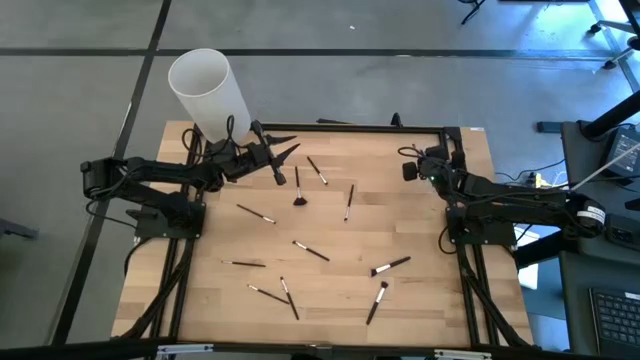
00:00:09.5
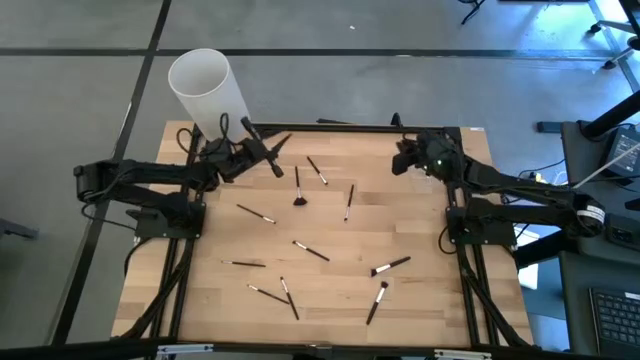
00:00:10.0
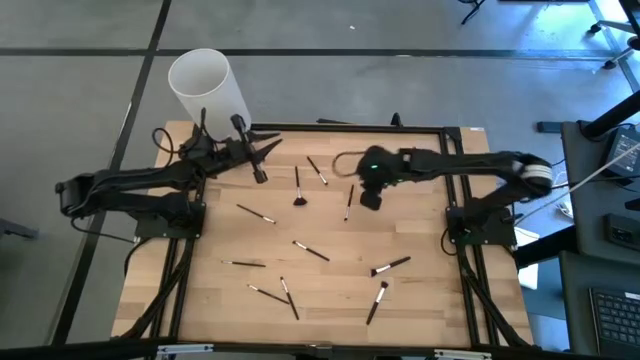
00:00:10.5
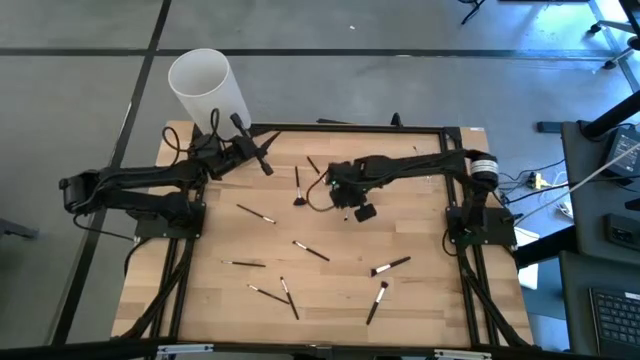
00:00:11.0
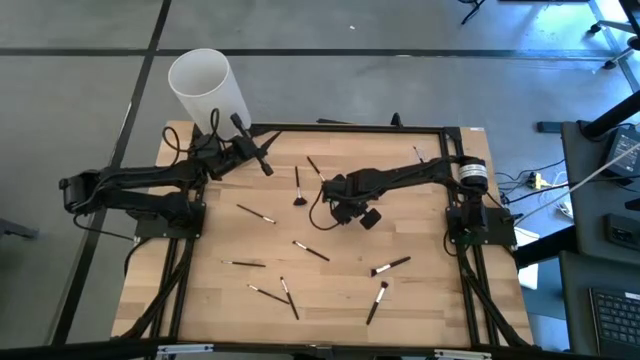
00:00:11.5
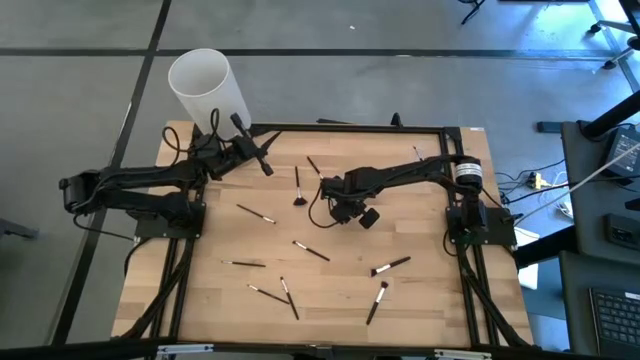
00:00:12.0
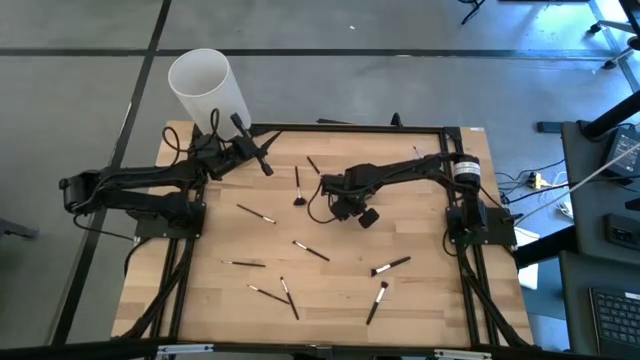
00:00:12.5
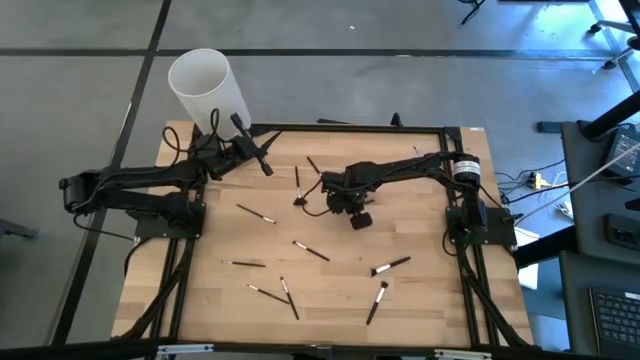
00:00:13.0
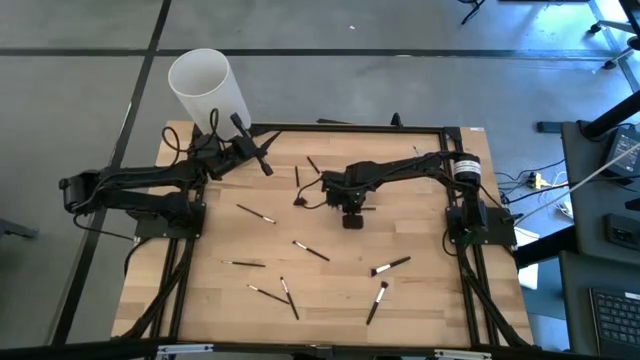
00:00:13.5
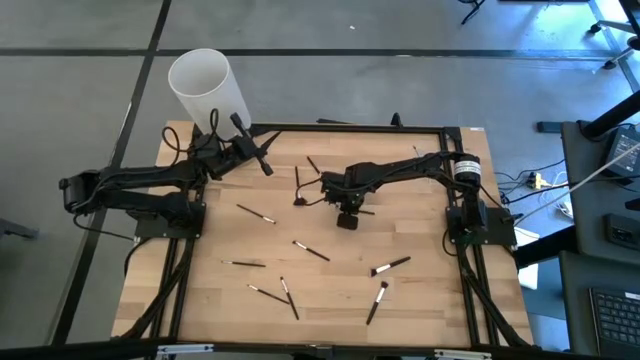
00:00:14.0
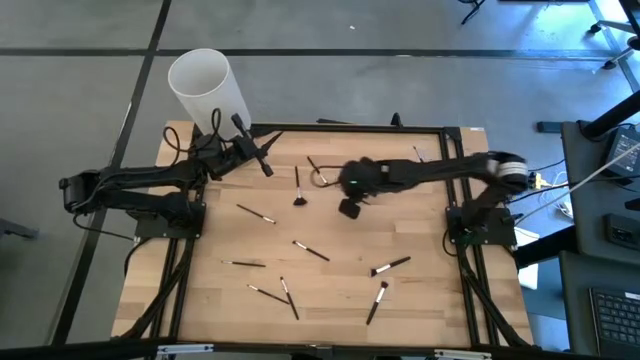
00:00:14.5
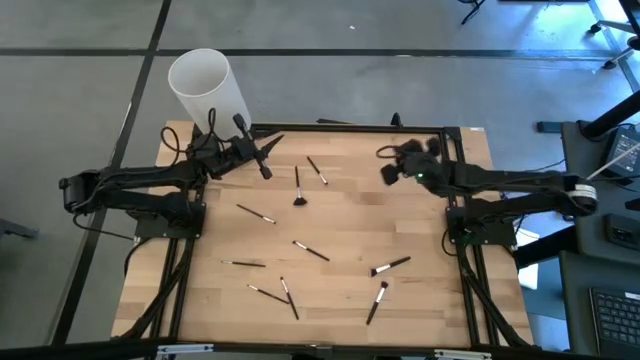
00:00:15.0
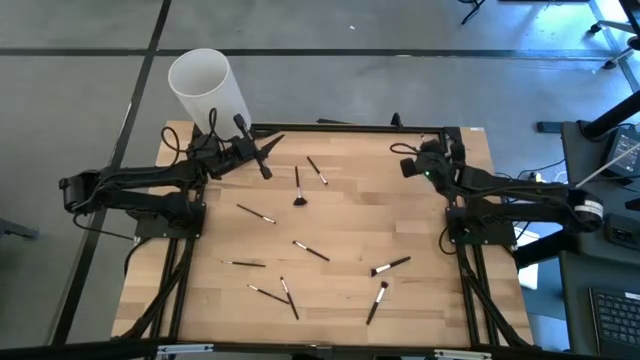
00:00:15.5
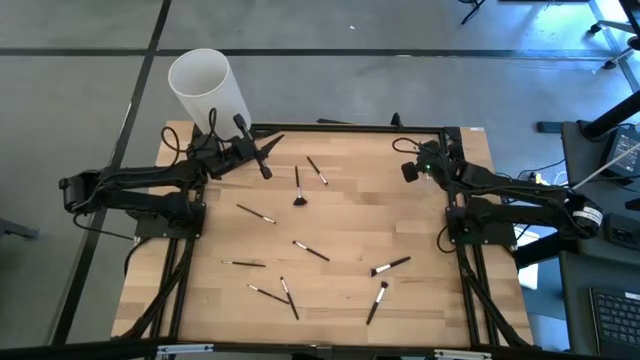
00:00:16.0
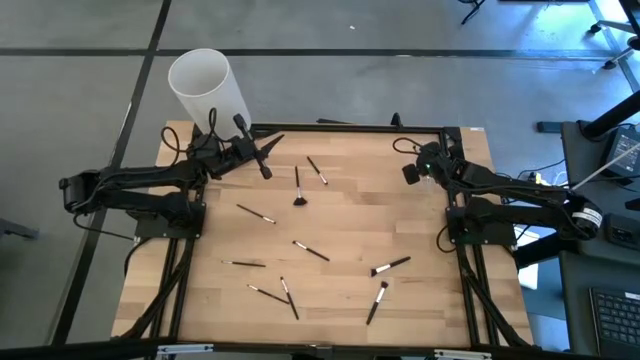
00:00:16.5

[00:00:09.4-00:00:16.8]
Task: Sort items
Put the foundation brush into the middle section of the transparent organizer

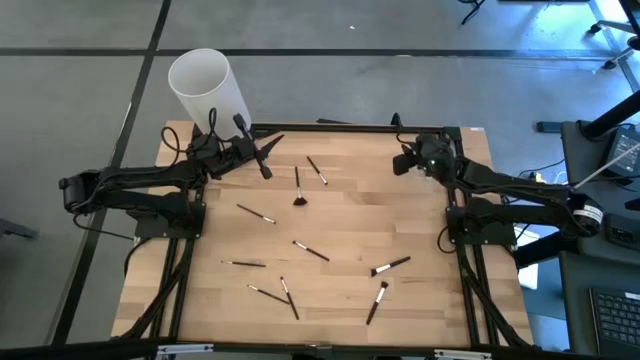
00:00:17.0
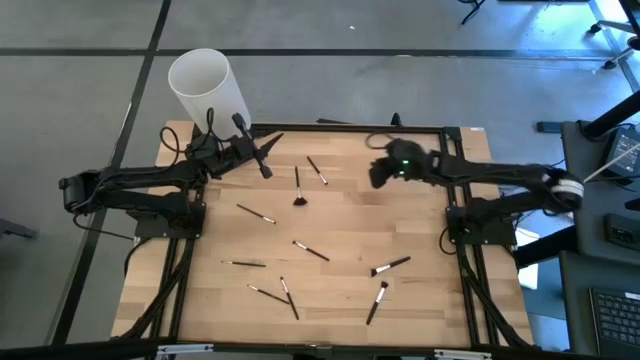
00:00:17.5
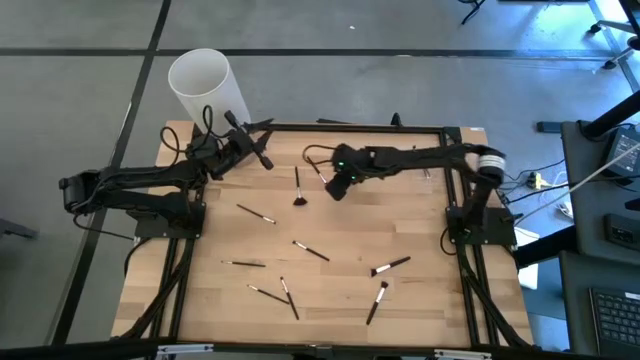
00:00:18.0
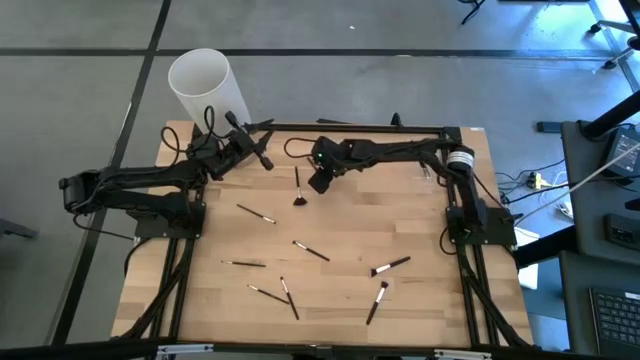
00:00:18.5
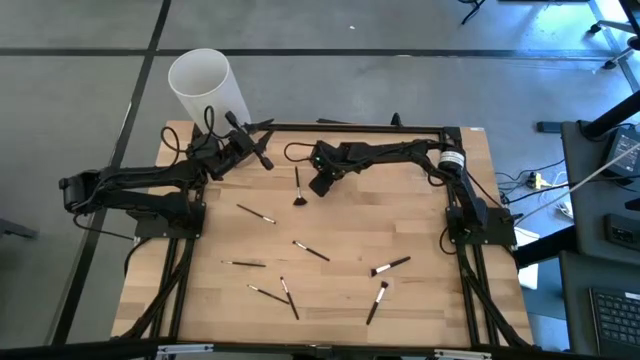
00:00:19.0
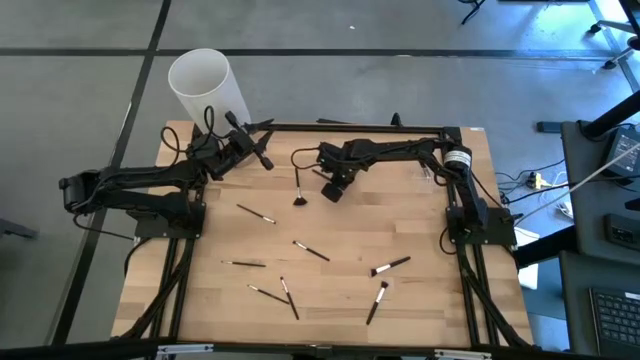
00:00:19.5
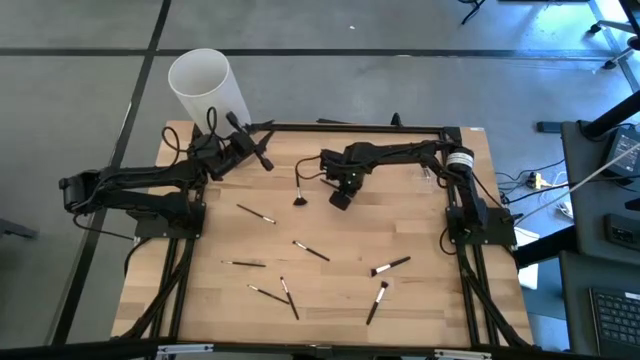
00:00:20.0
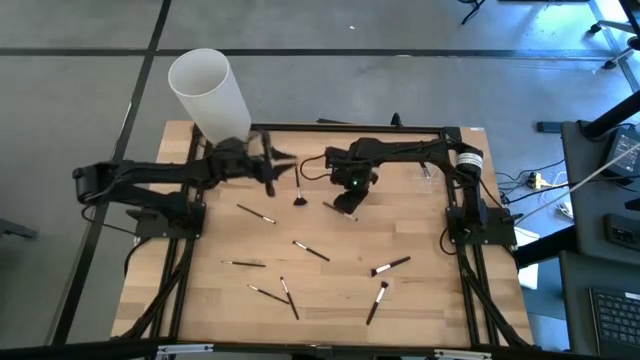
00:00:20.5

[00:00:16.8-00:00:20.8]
Put the foundation brush into the middle section of the transparent organizer

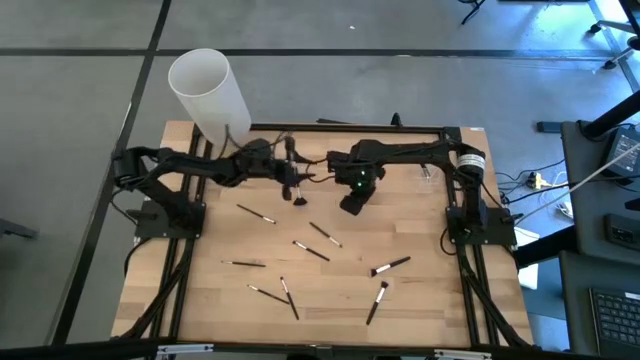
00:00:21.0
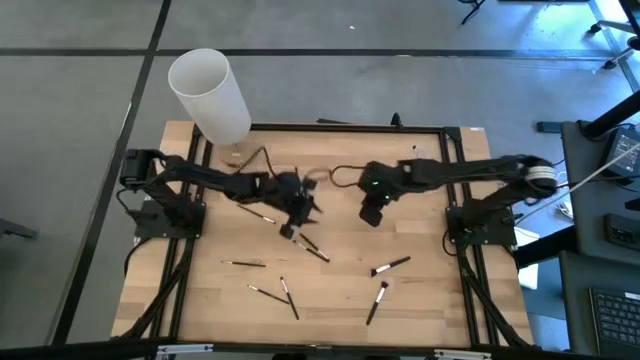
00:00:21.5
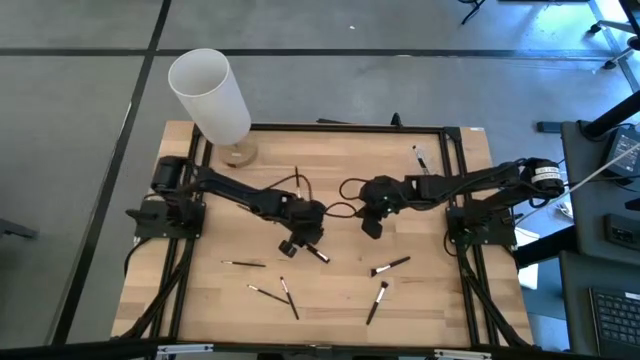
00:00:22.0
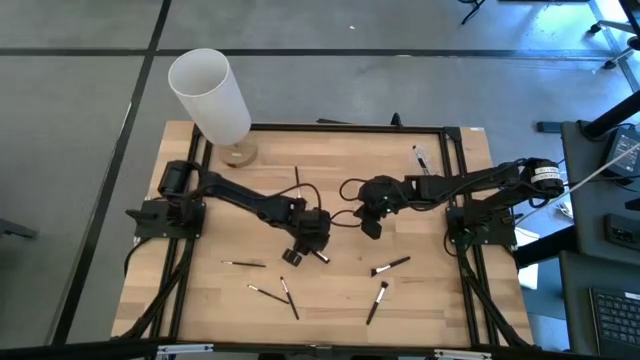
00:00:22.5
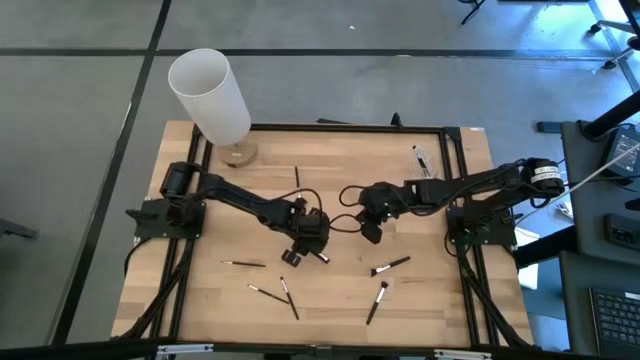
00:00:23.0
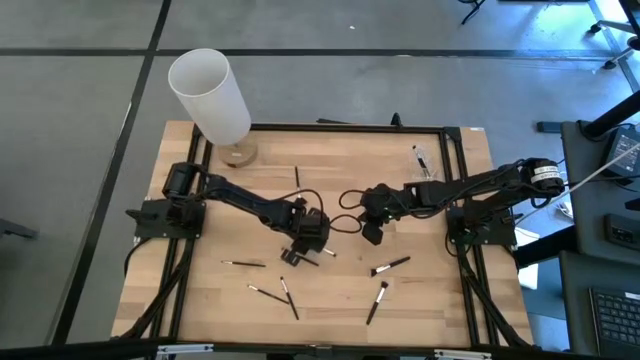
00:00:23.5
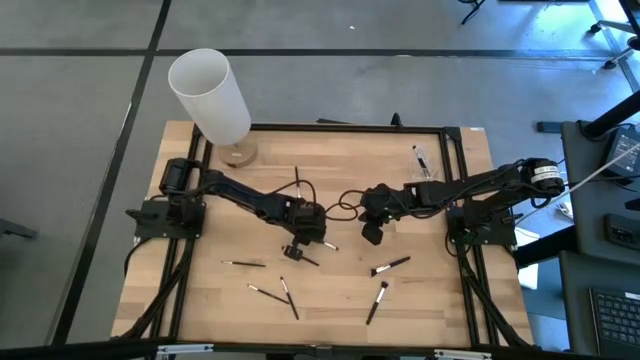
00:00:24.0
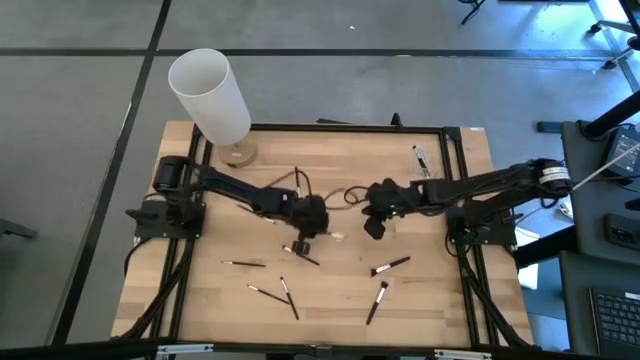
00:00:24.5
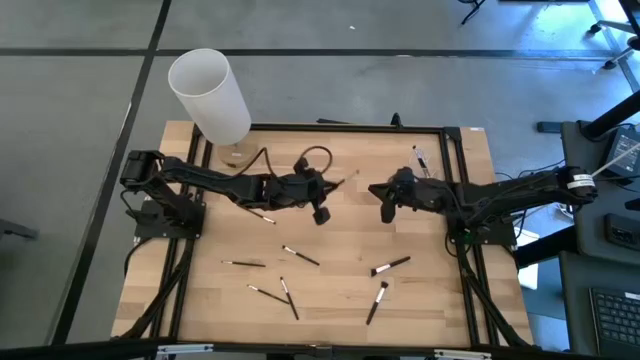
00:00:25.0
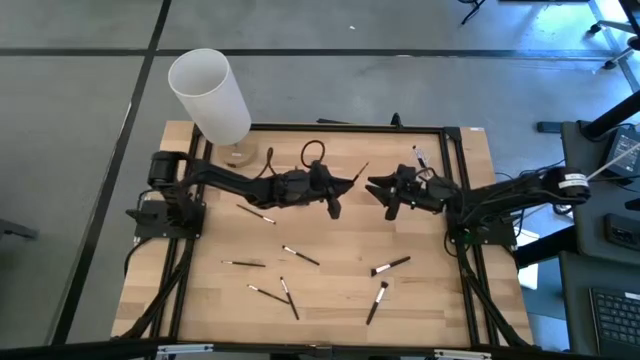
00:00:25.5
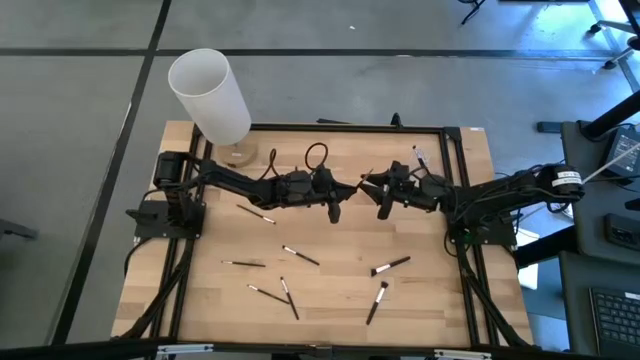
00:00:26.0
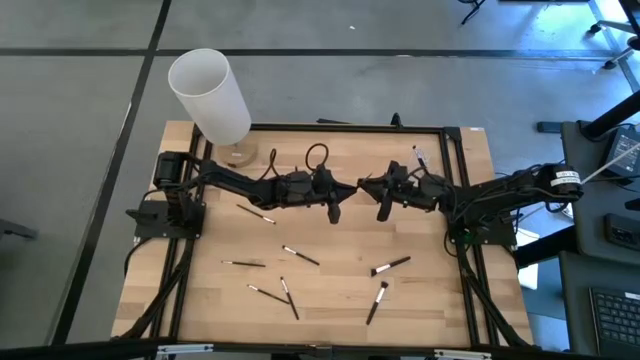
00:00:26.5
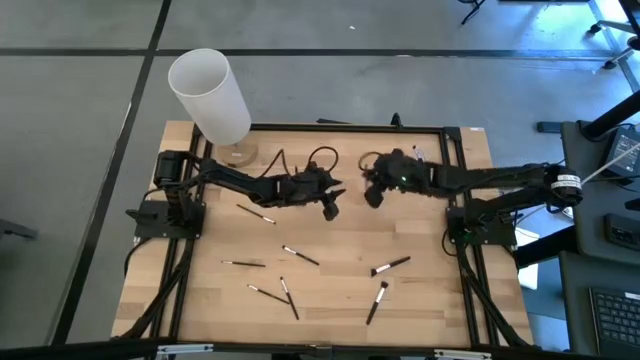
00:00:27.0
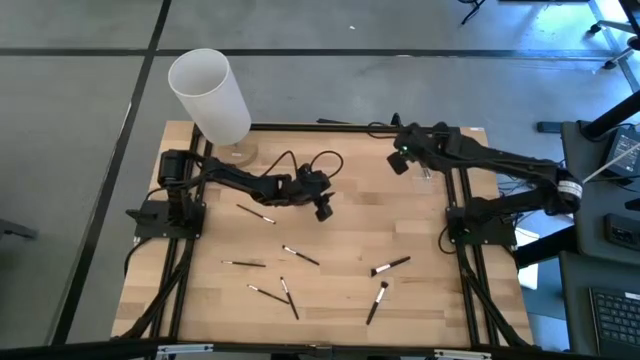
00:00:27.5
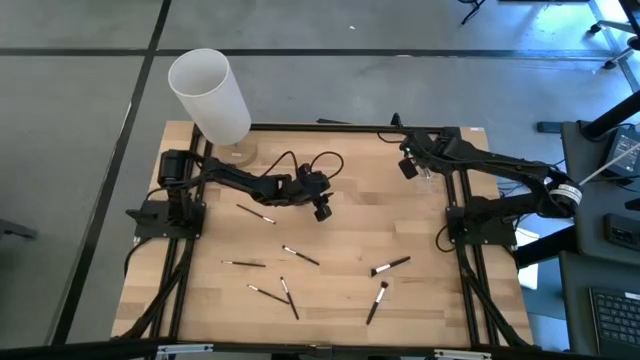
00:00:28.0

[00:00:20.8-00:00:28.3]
Put the foundation brush into the middle section of the transparent organizer
